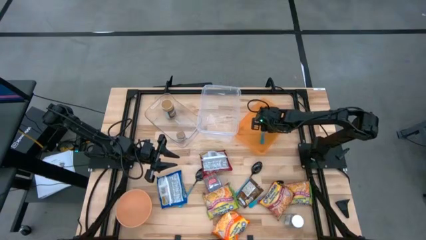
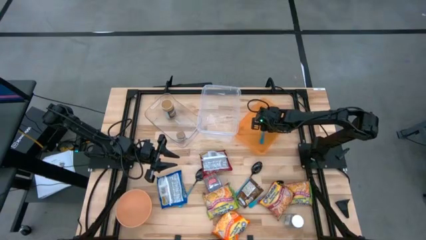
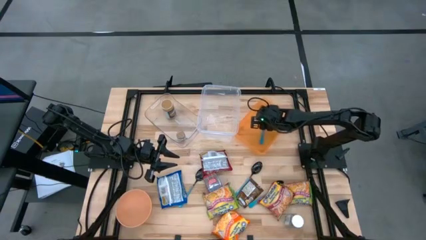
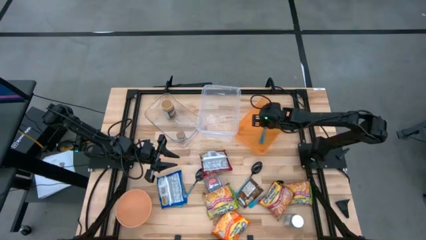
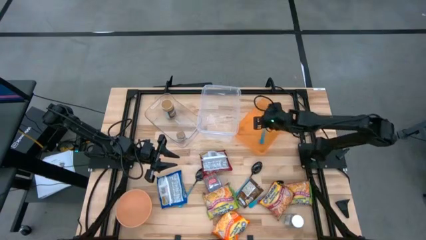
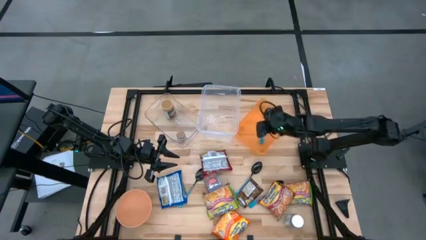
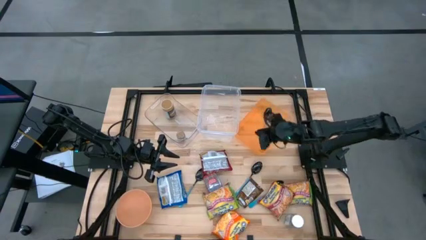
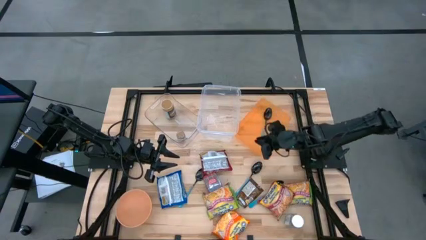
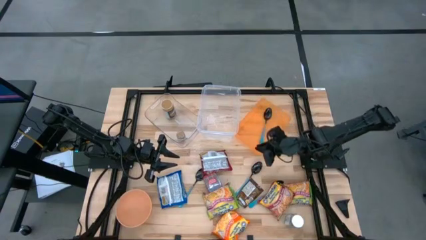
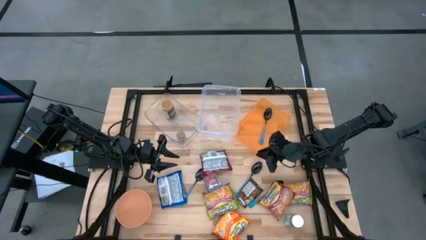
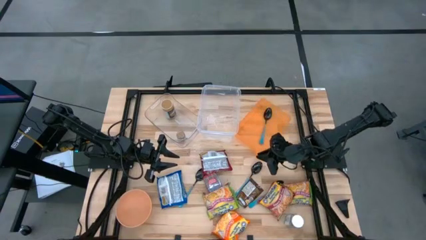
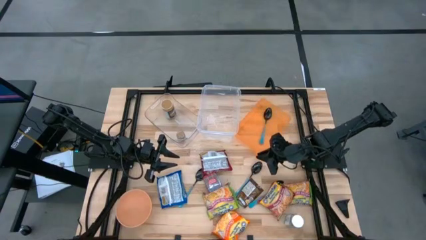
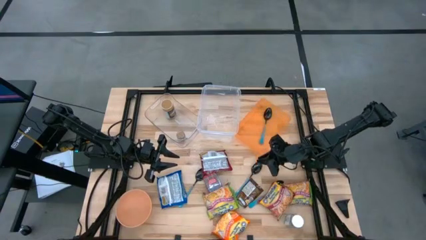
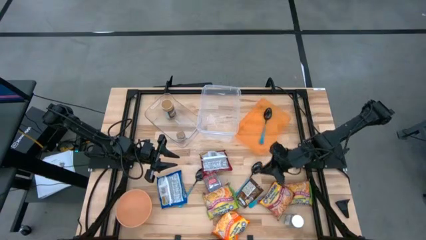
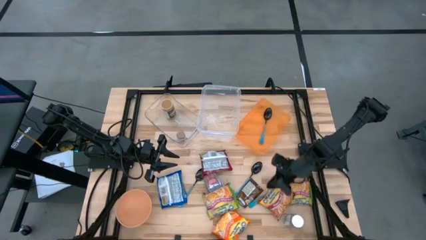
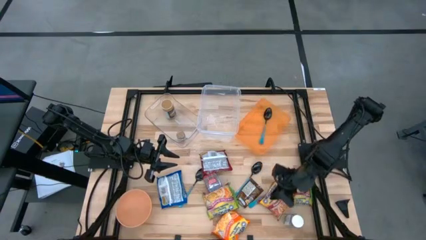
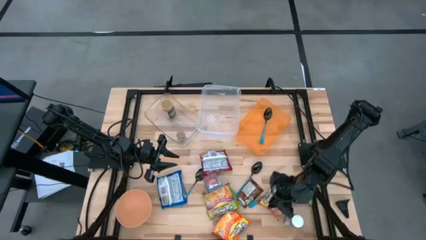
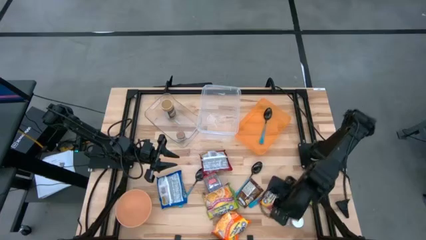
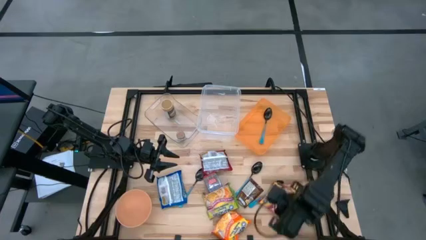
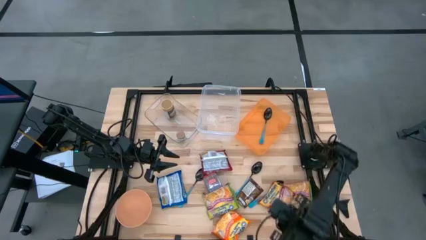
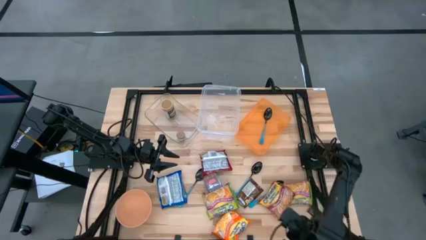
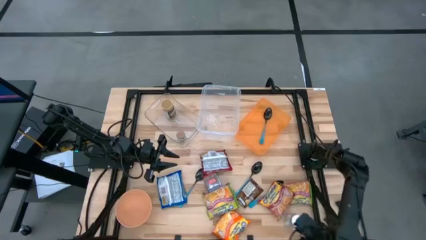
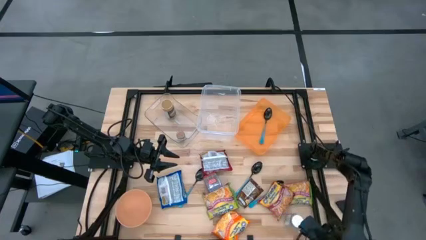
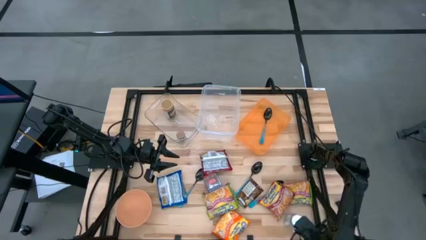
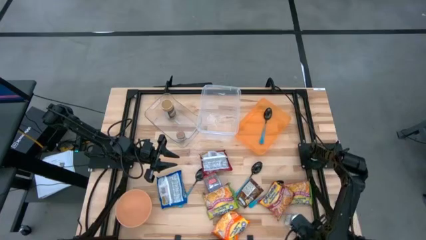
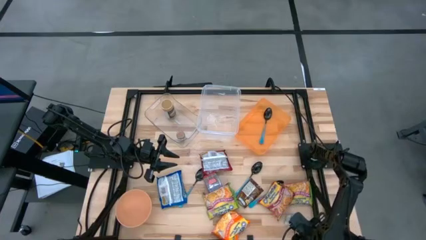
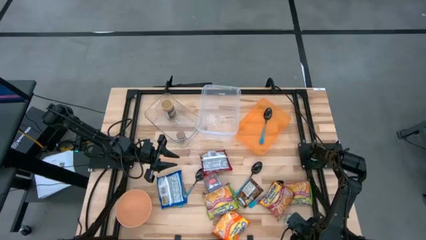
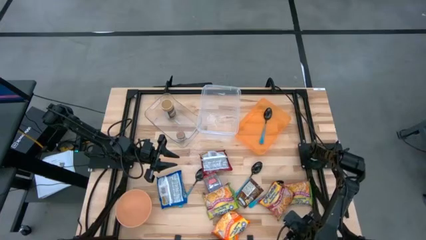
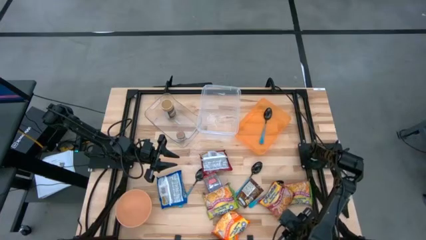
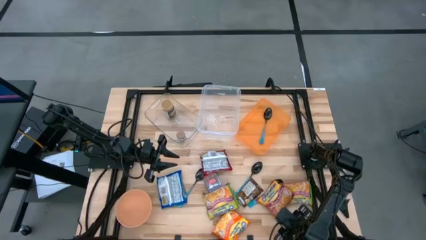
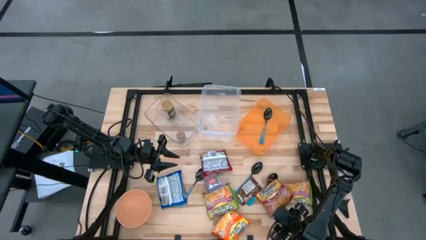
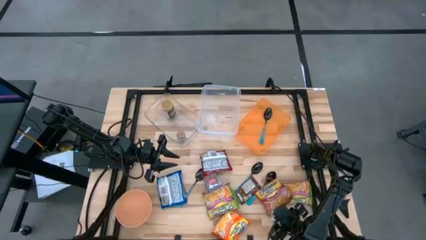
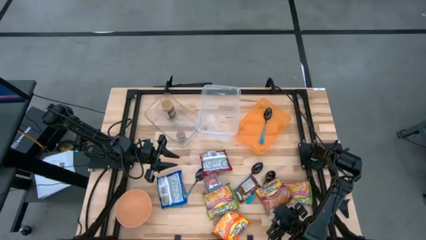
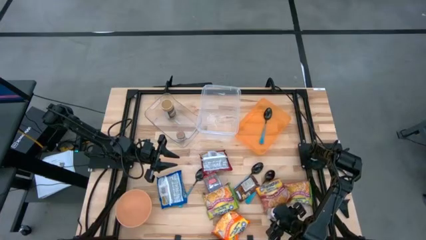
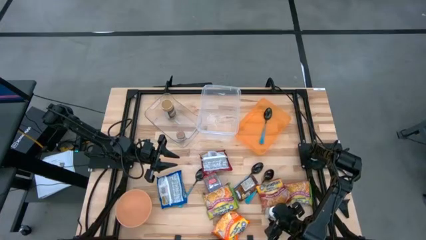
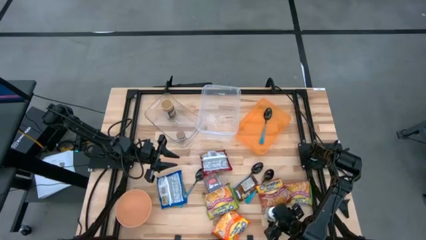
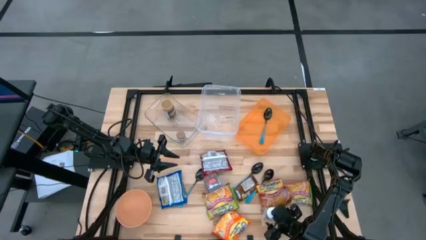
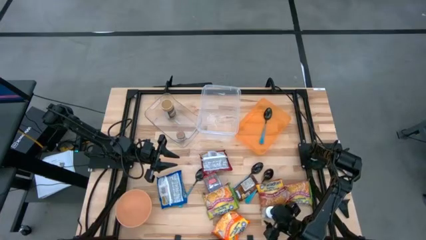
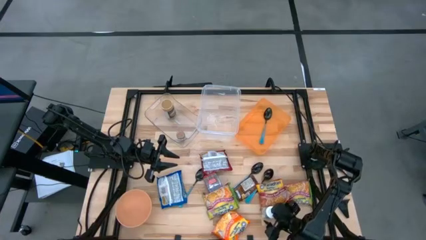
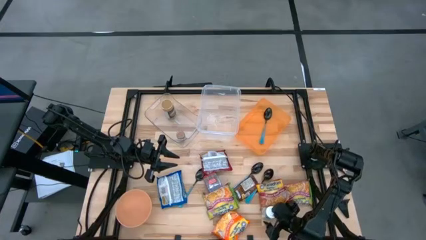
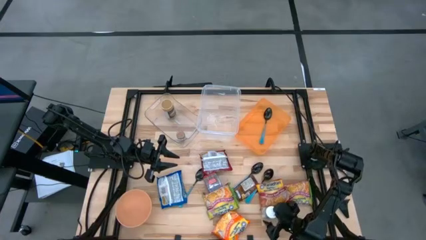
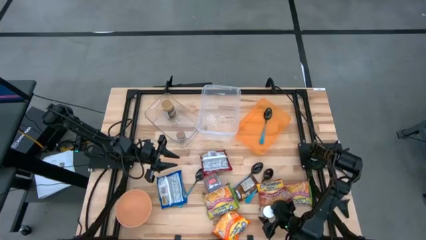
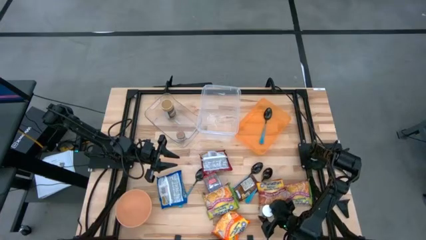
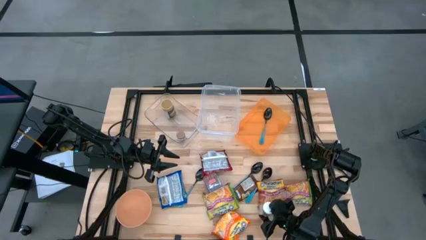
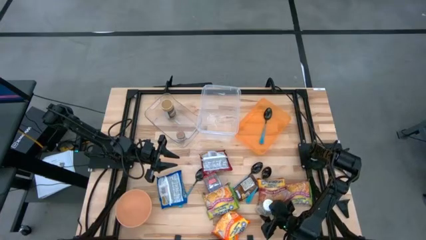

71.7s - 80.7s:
Task: Pick & Place Food Item
Put the white seasoning bottle into the transparent bin

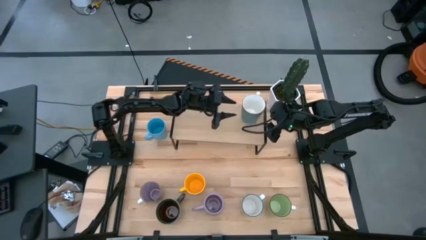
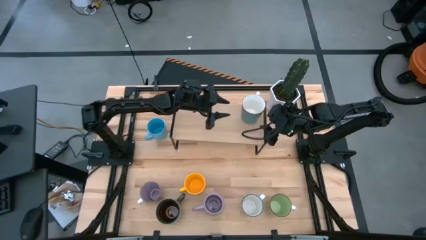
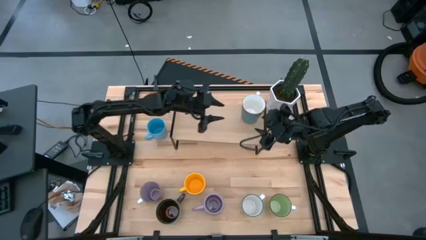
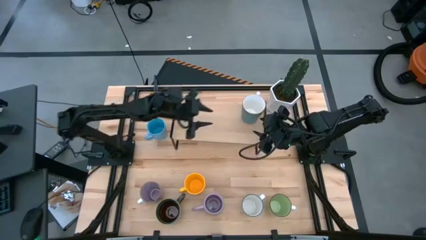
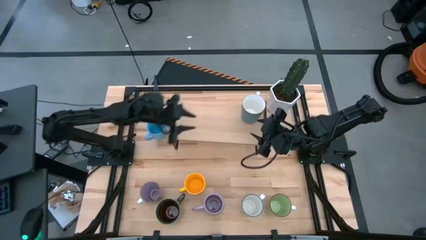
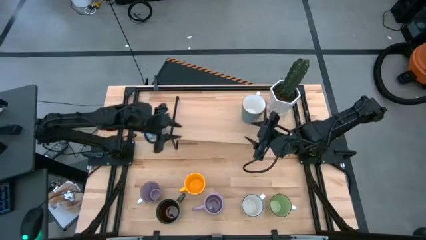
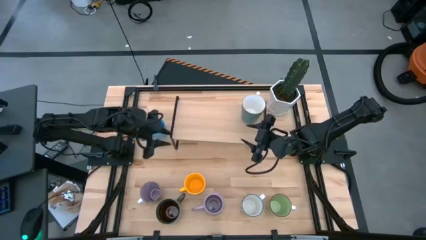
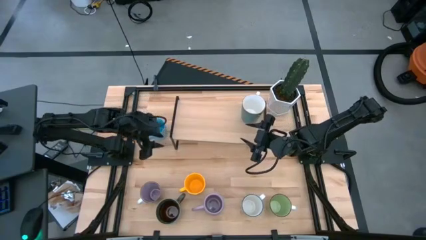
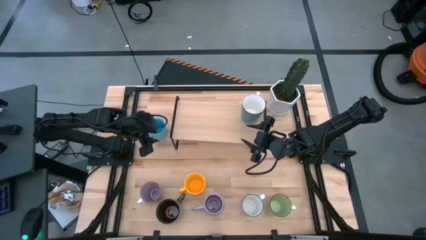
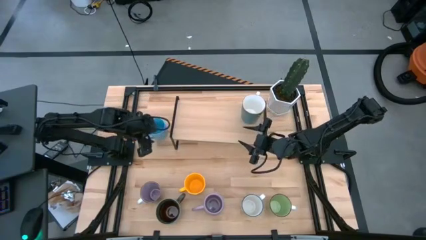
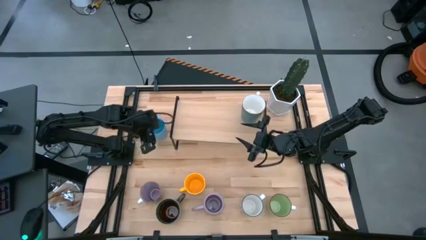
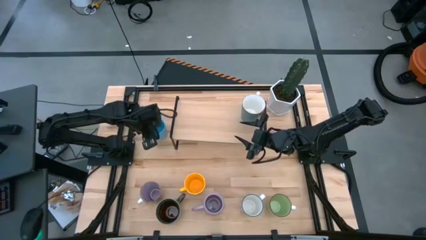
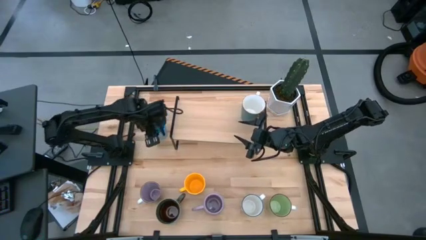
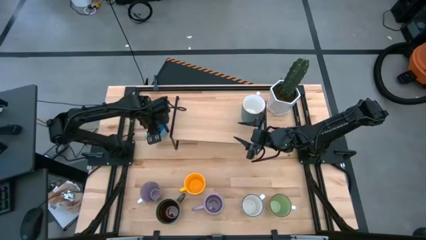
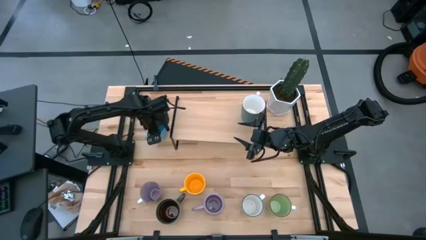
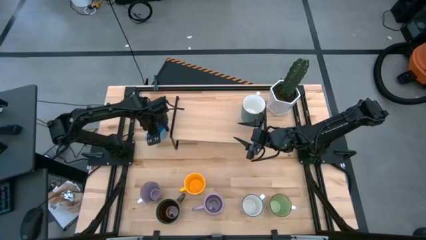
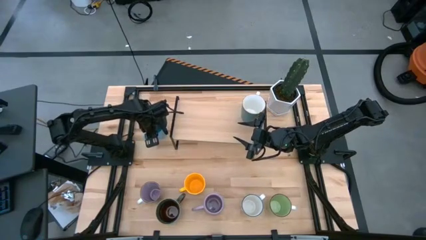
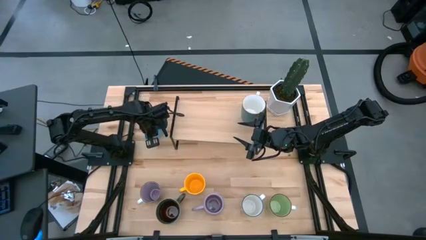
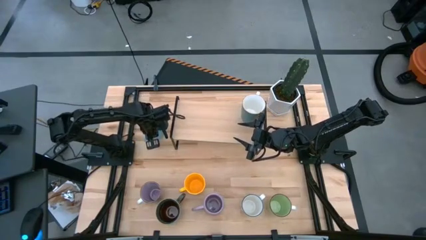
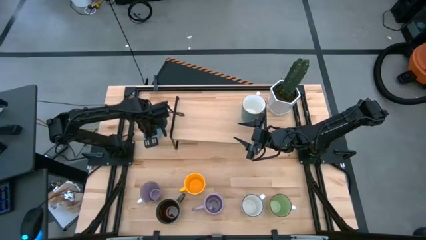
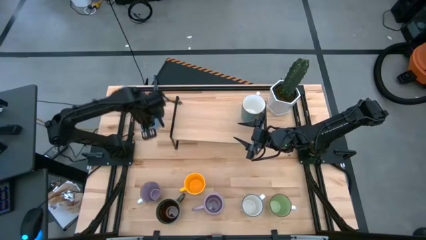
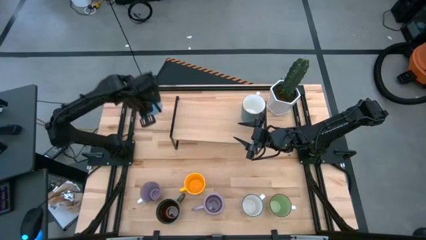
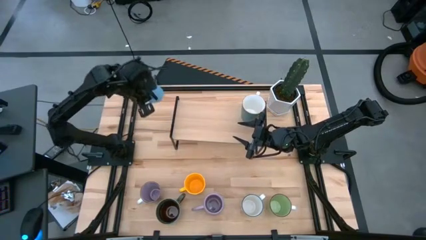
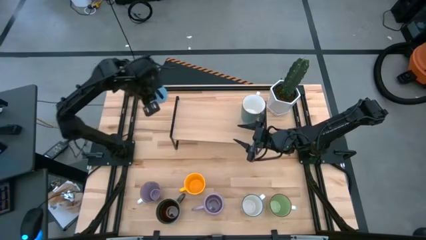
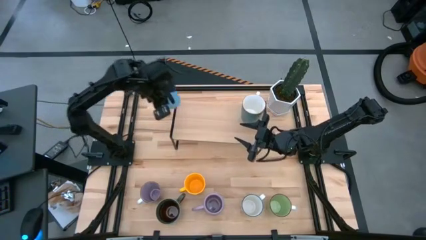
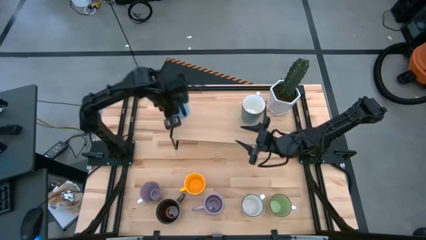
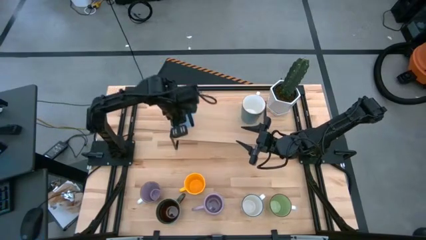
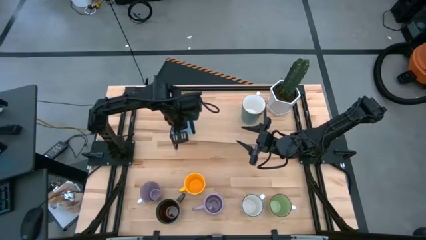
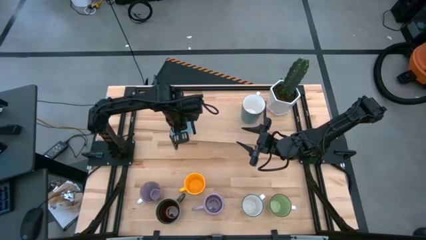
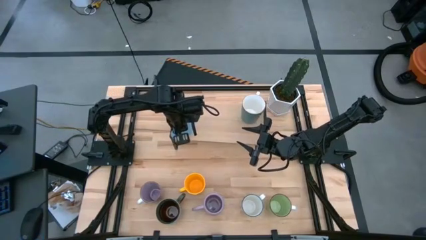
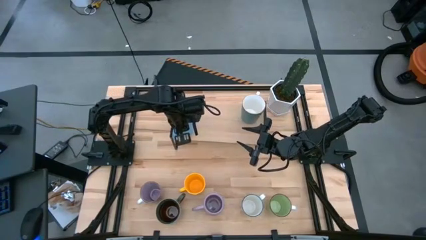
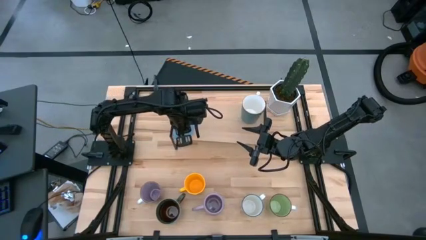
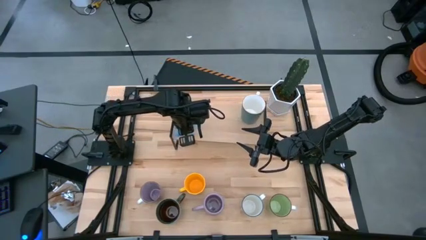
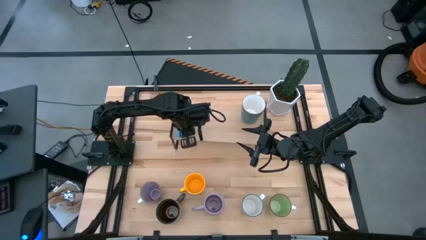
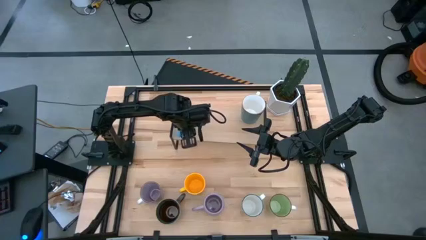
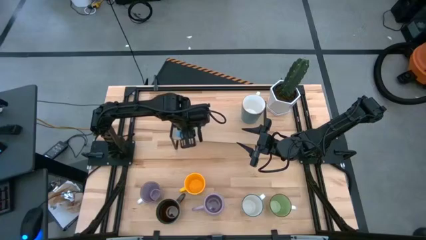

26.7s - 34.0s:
Task: Place coffee mugs
Put the light blue mug on the shelf
